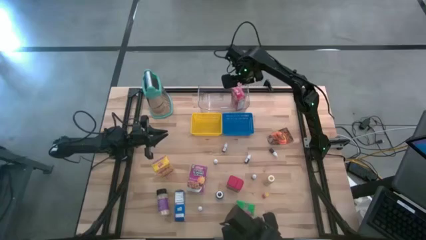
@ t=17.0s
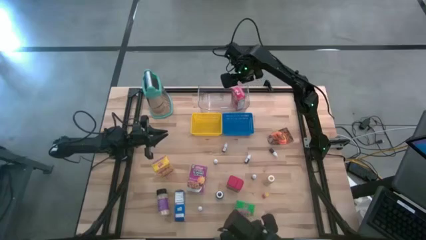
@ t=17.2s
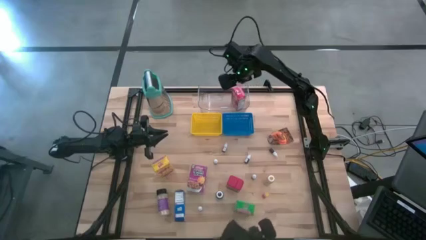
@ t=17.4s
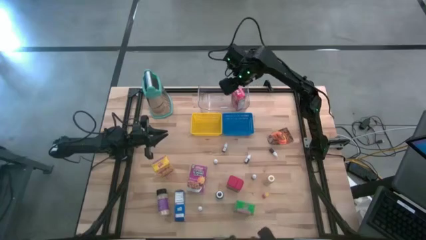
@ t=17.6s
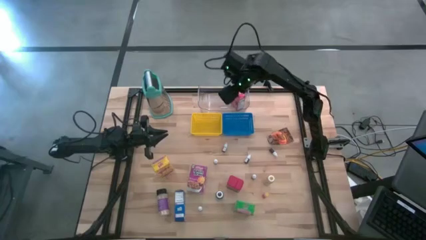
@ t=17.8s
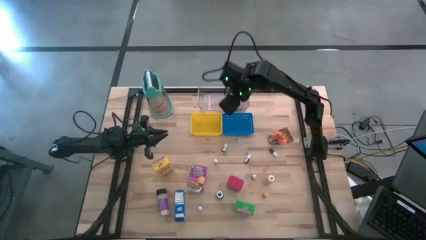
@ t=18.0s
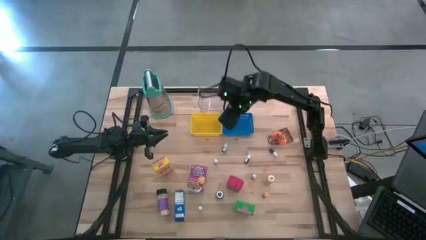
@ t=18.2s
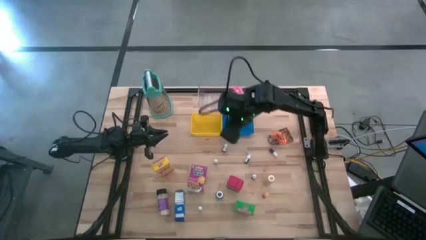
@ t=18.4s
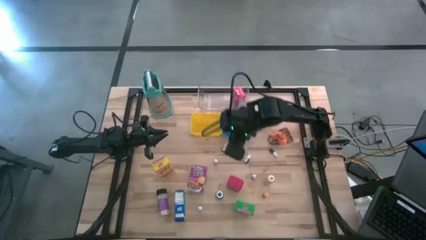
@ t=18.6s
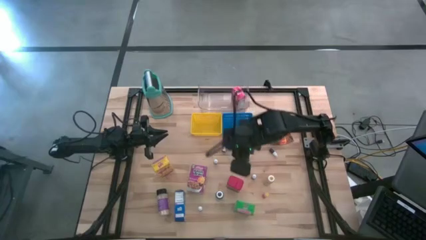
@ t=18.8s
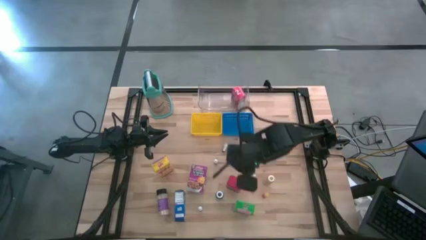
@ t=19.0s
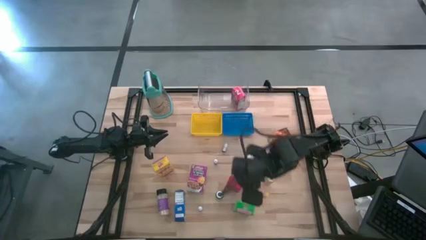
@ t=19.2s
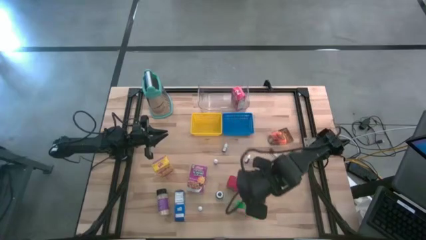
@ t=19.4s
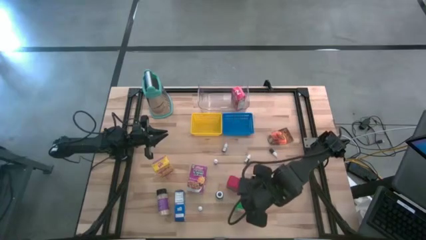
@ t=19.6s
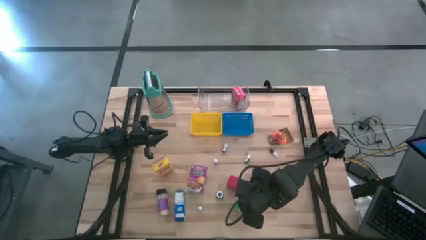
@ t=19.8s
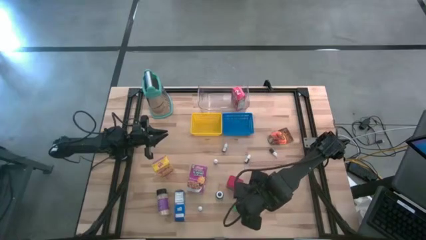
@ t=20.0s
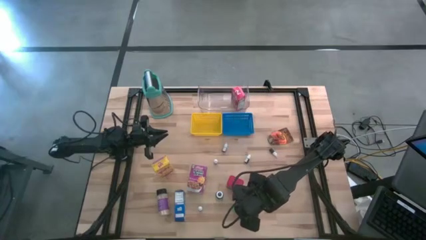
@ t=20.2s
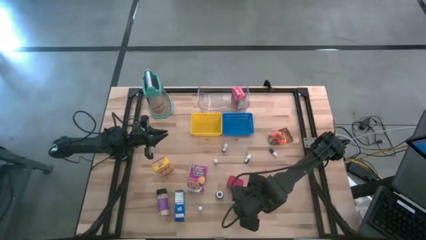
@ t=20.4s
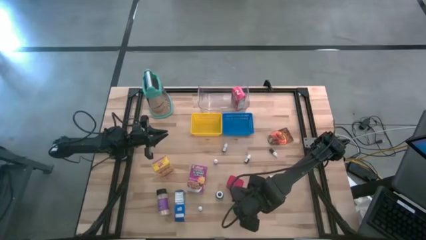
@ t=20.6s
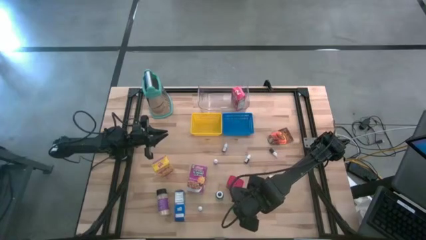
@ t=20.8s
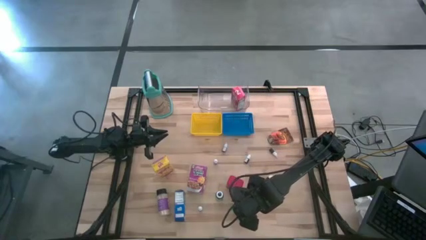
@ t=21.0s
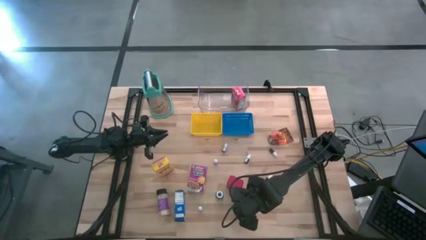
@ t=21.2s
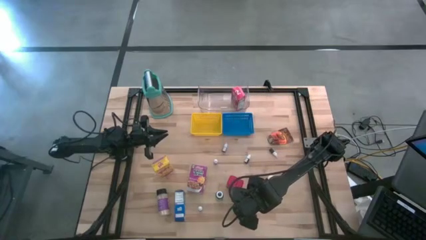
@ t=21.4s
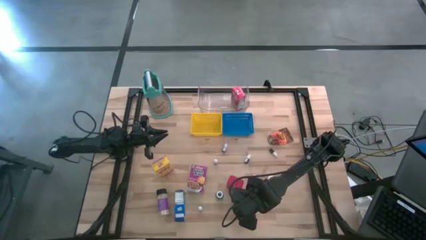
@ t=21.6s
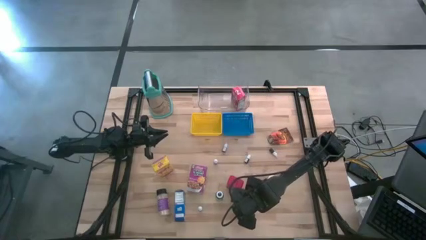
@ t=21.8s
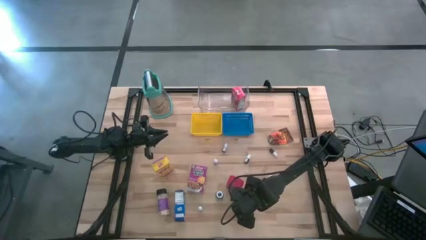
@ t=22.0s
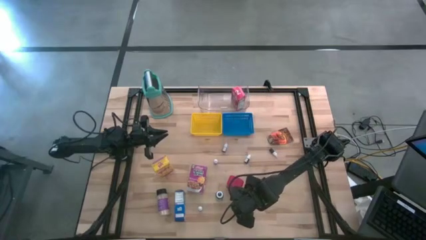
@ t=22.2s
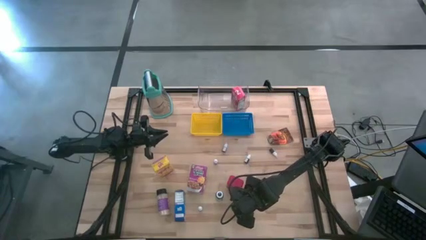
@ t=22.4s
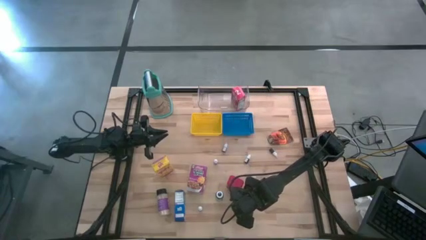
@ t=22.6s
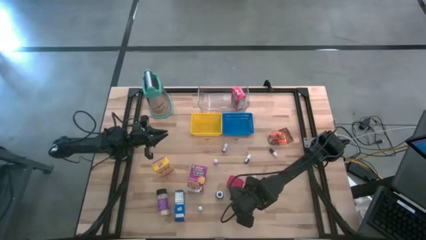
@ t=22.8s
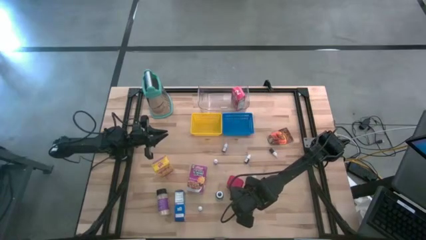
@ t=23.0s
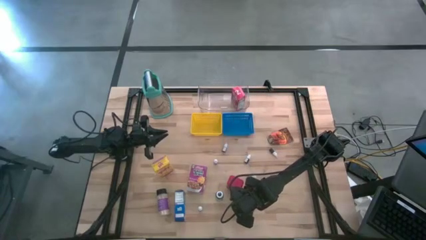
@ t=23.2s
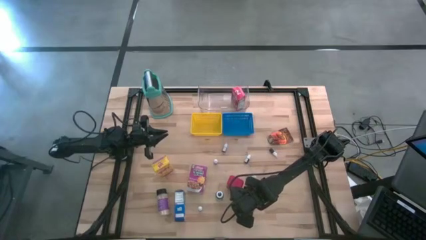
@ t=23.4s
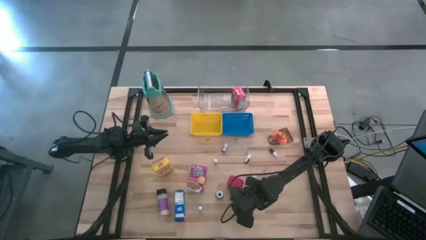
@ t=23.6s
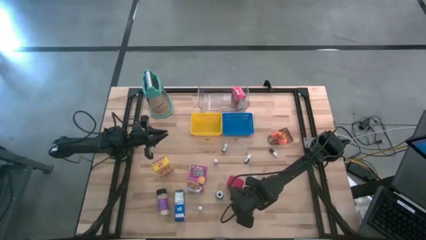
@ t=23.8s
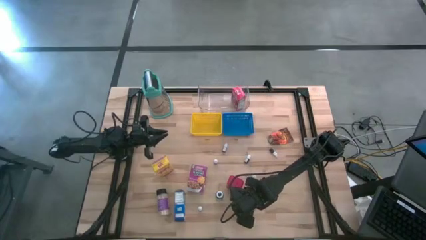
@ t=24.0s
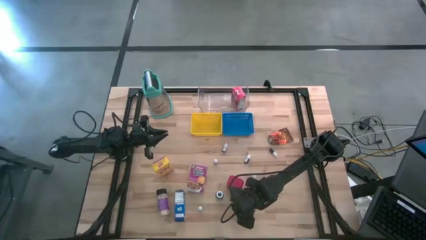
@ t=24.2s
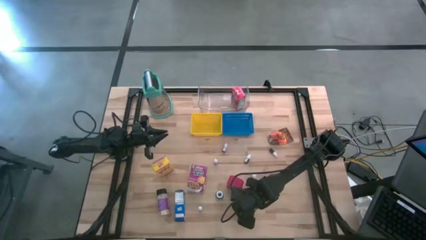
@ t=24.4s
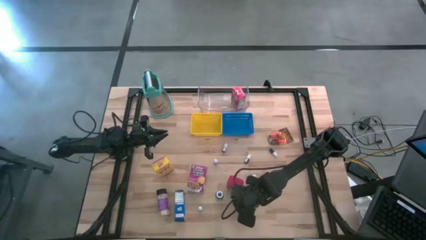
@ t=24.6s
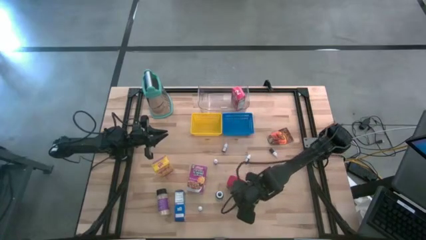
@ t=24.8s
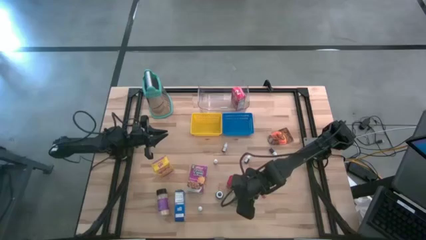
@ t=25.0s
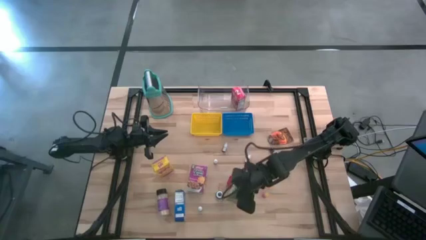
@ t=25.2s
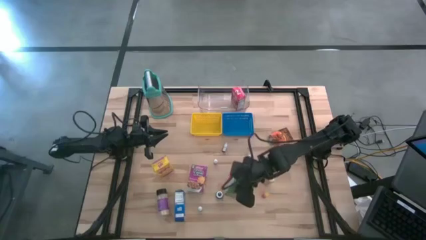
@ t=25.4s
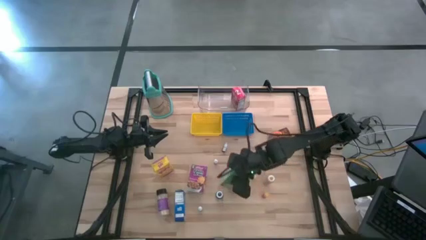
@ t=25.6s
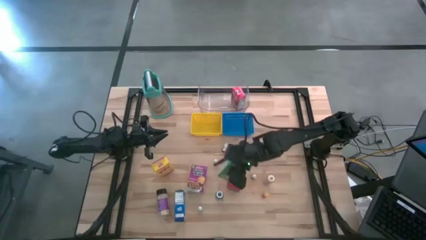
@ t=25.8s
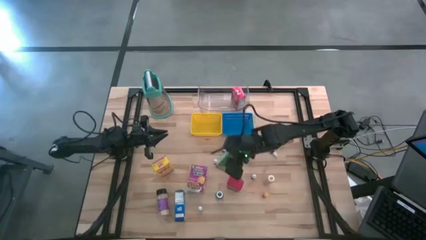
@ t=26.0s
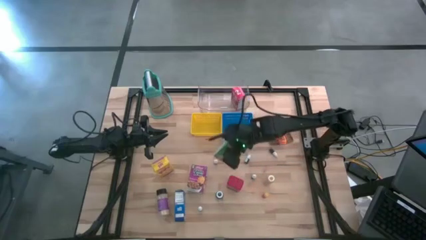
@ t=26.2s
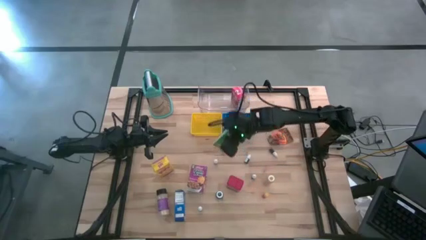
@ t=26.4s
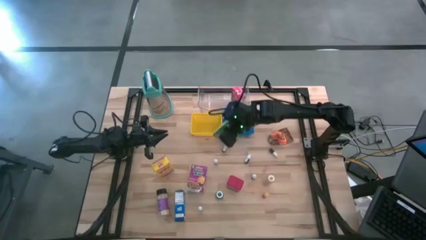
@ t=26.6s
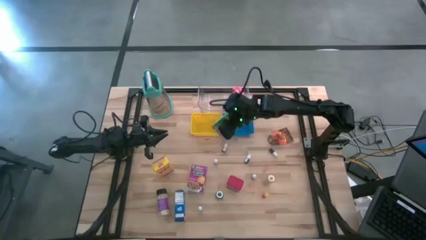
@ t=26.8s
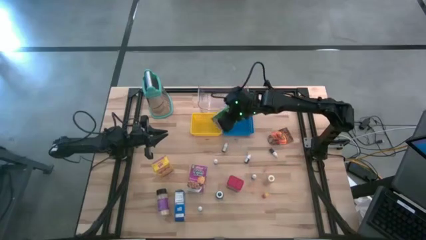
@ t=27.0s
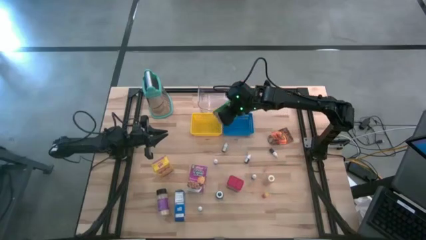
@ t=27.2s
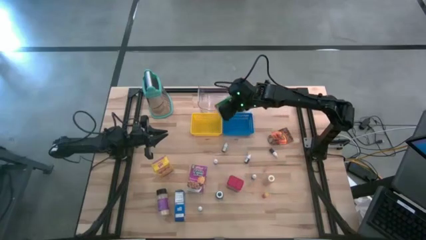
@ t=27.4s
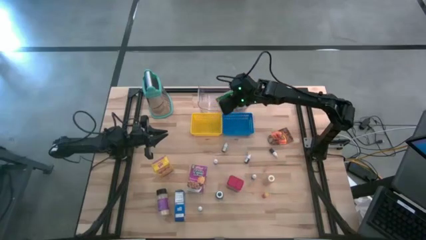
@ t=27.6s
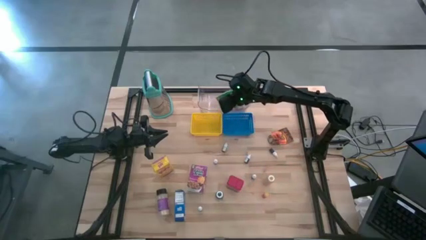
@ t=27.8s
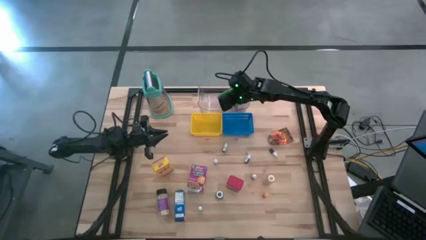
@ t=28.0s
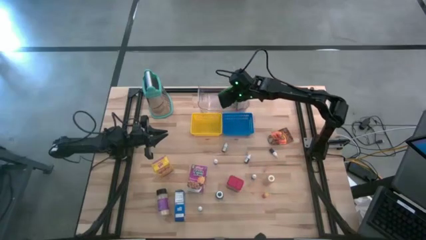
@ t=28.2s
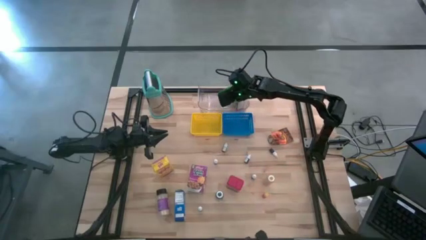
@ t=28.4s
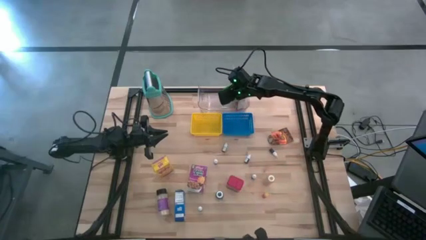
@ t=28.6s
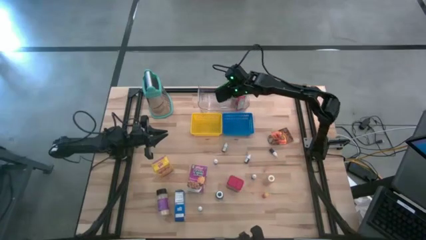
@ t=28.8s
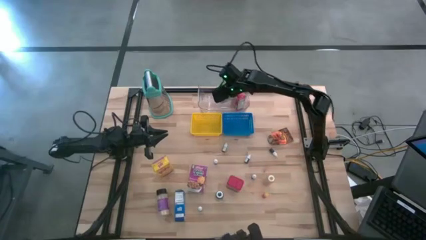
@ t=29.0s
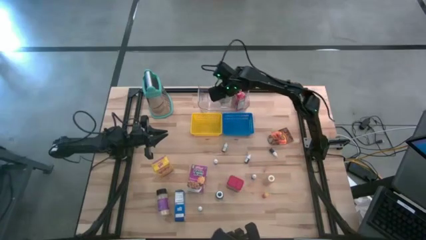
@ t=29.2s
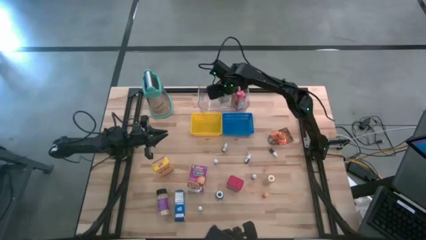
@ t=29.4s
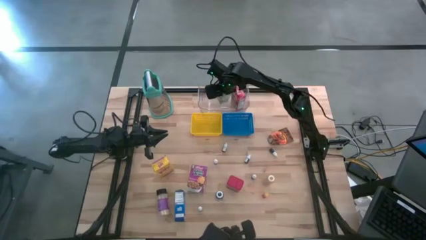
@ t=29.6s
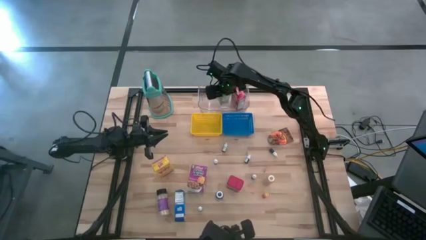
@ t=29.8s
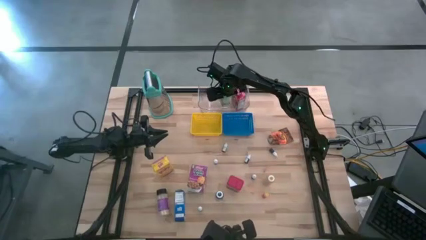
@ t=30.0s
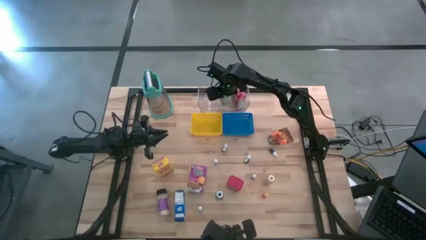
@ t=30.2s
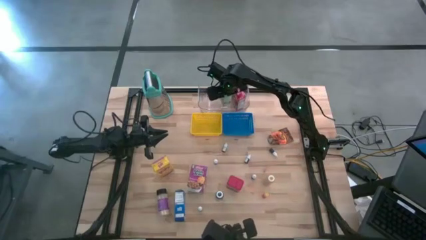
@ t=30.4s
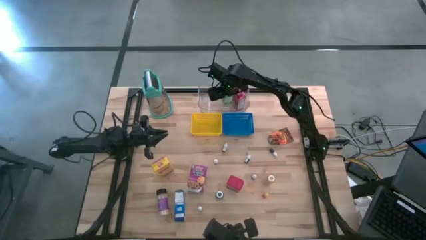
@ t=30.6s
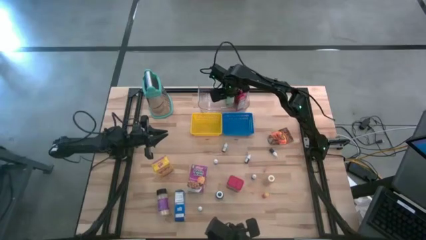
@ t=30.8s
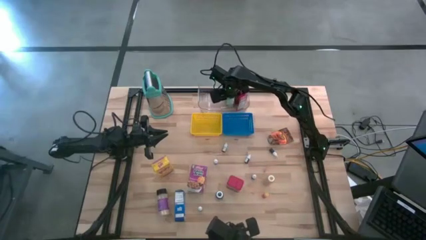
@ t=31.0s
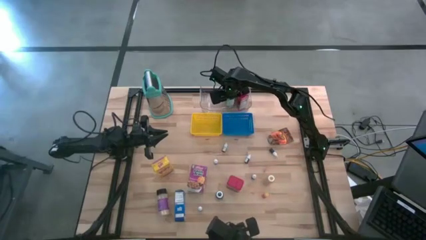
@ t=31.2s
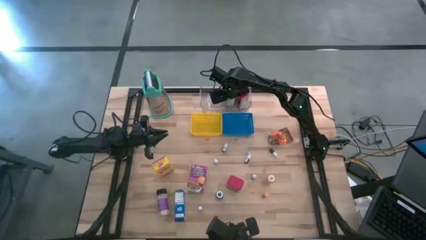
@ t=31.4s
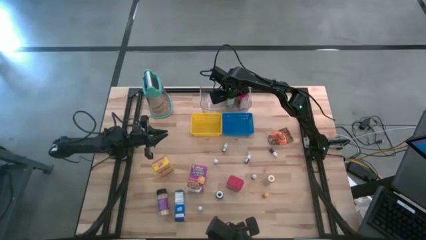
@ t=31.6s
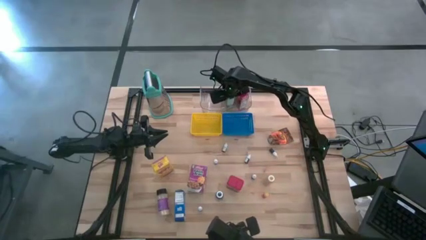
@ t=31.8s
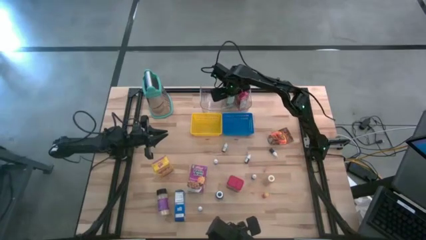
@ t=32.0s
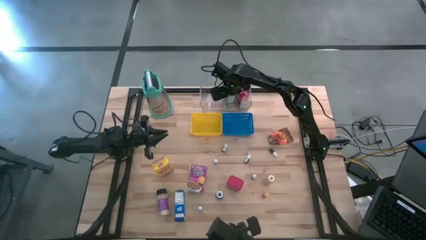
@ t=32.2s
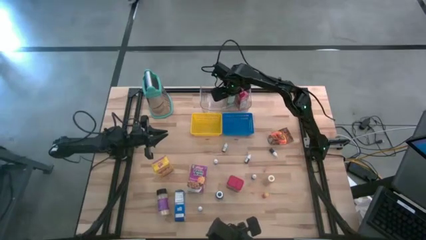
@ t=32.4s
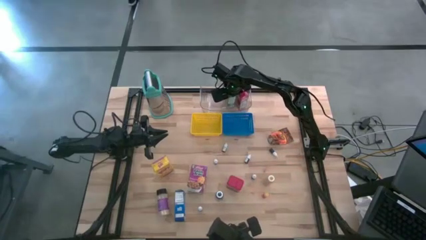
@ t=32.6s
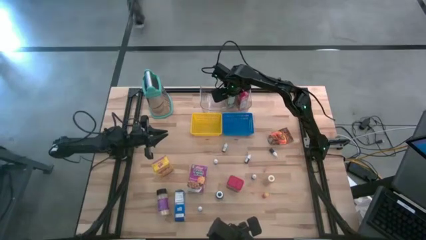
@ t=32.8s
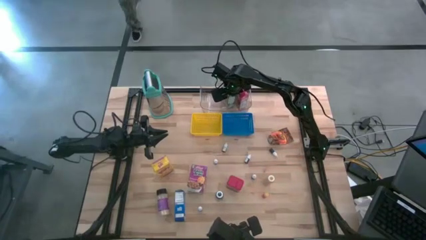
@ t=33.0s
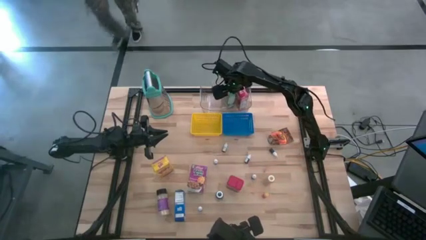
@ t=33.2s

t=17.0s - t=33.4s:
Task: Pick & Place Kitchen Items
Put the green cereal box into the transparent bin
